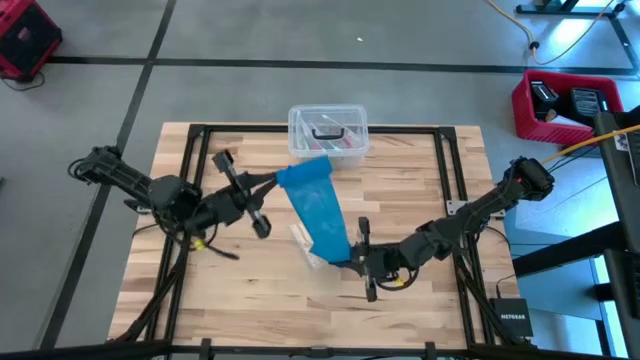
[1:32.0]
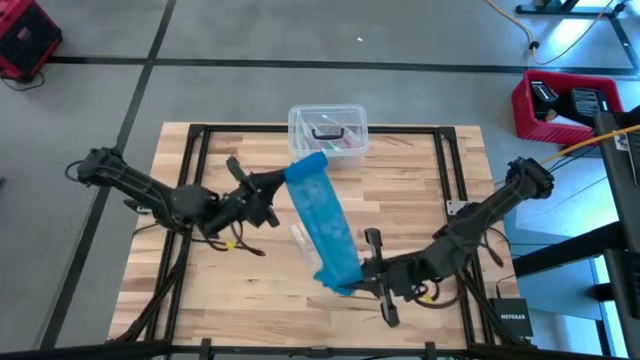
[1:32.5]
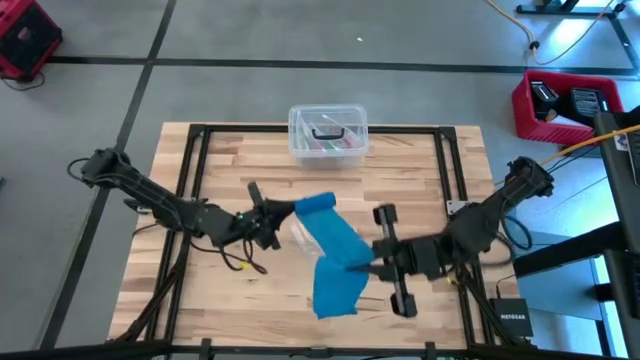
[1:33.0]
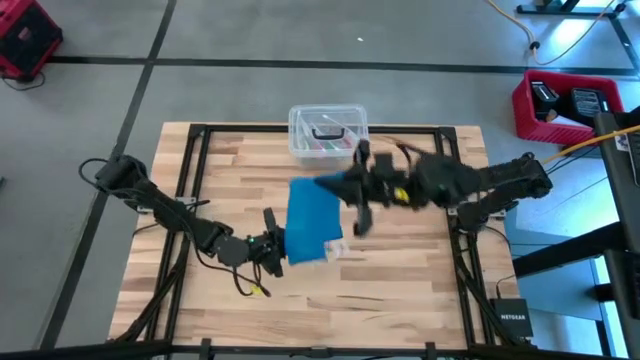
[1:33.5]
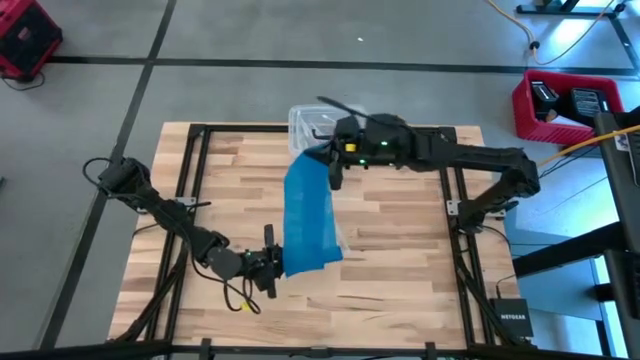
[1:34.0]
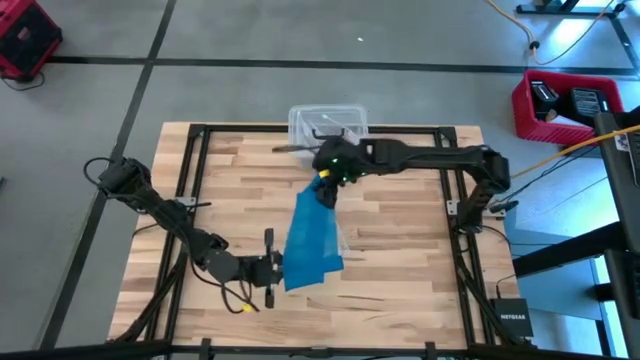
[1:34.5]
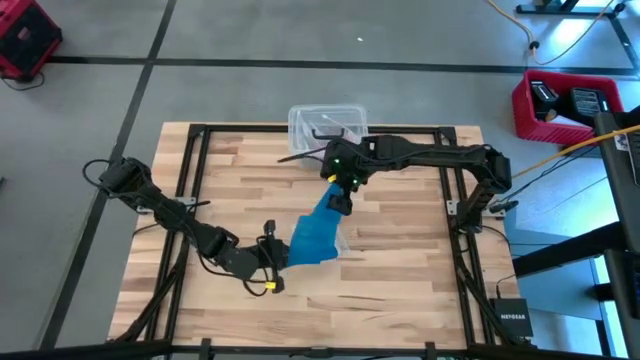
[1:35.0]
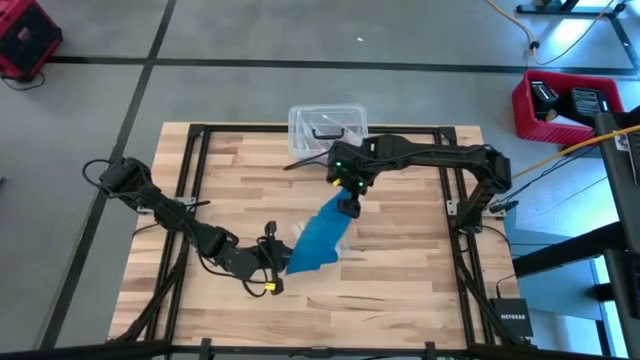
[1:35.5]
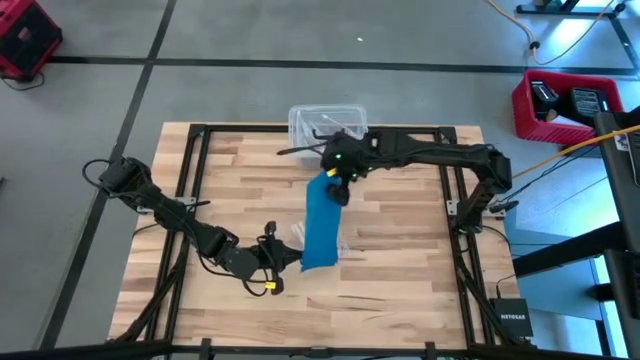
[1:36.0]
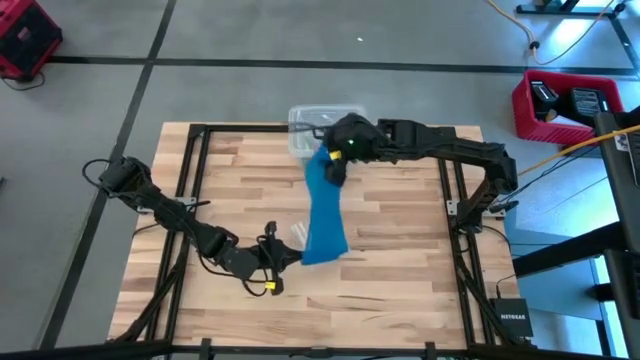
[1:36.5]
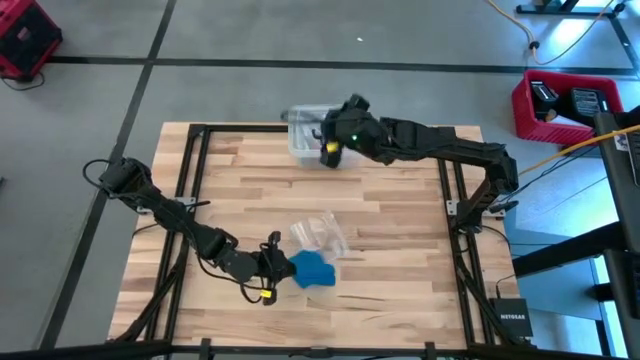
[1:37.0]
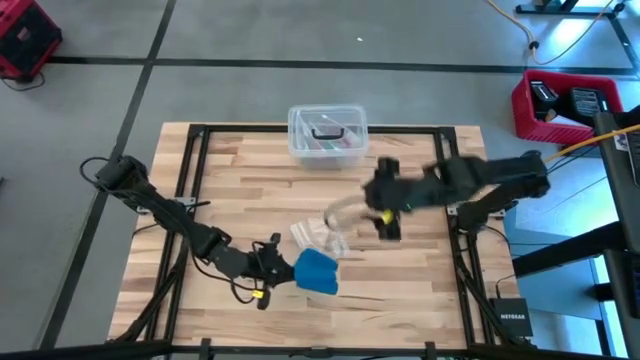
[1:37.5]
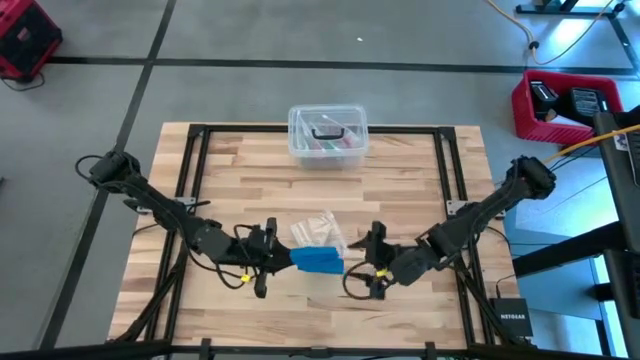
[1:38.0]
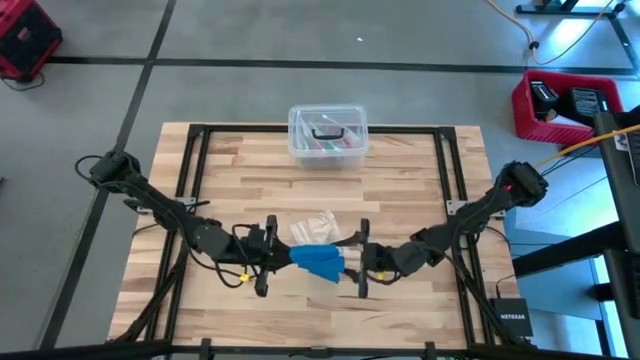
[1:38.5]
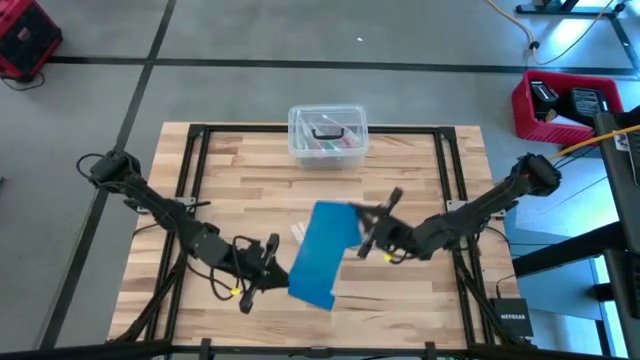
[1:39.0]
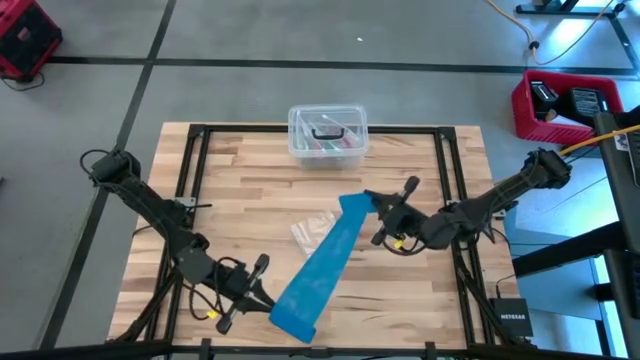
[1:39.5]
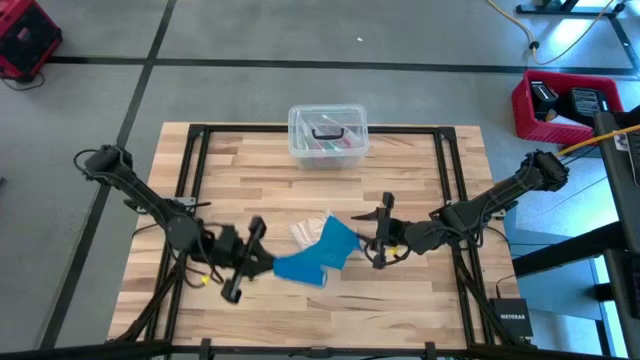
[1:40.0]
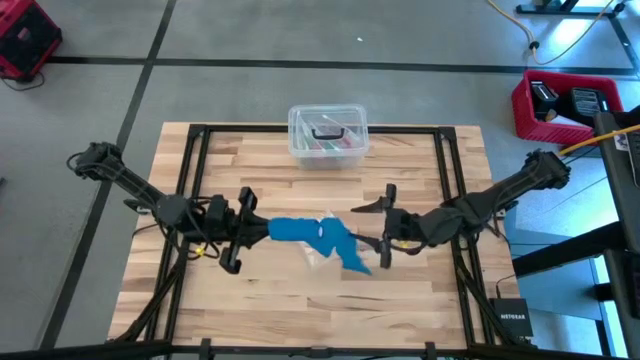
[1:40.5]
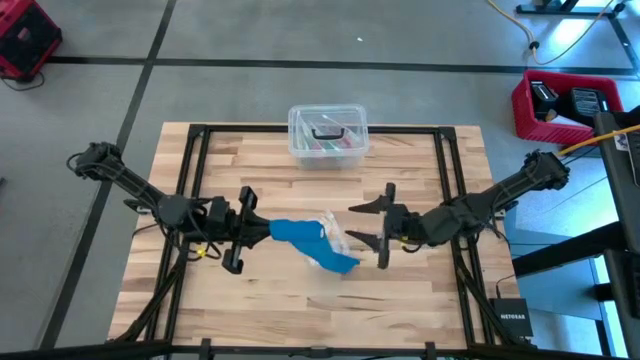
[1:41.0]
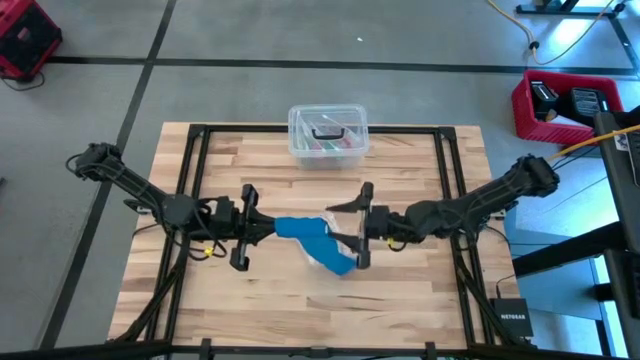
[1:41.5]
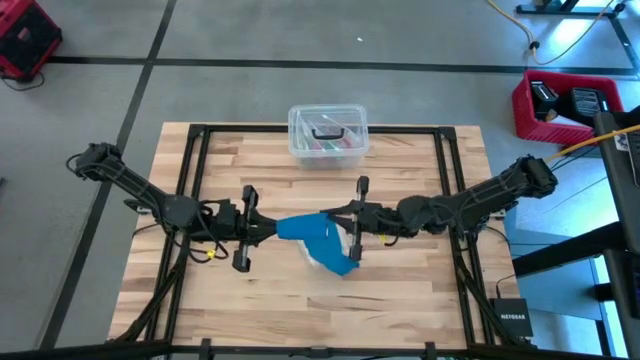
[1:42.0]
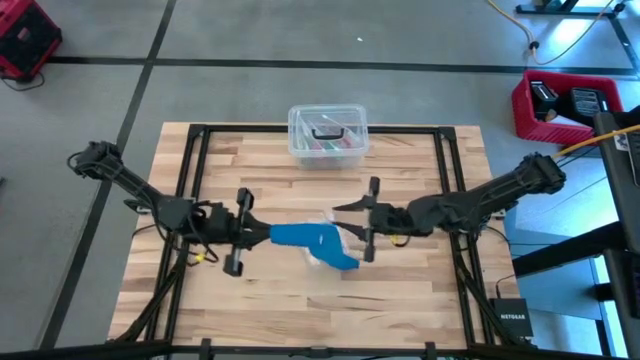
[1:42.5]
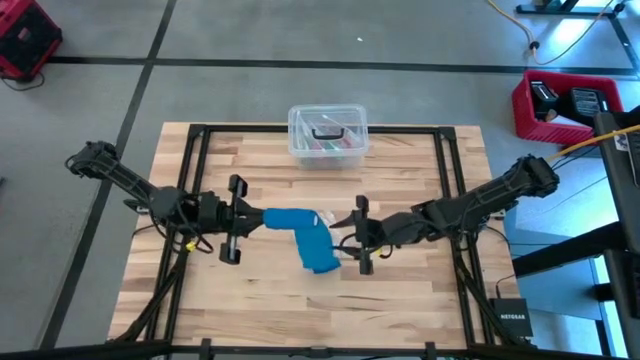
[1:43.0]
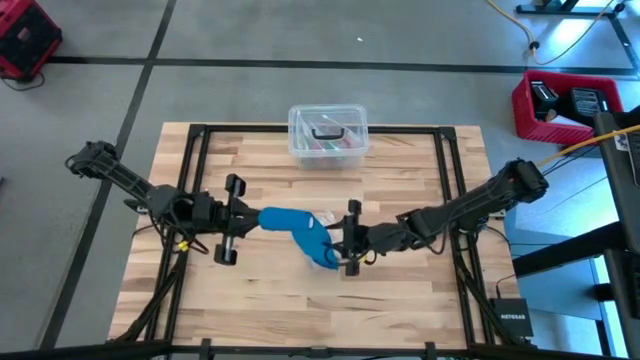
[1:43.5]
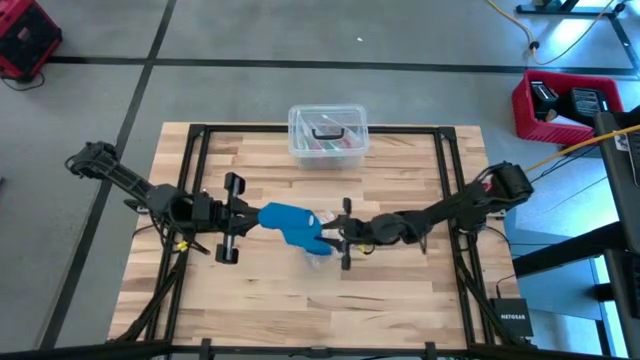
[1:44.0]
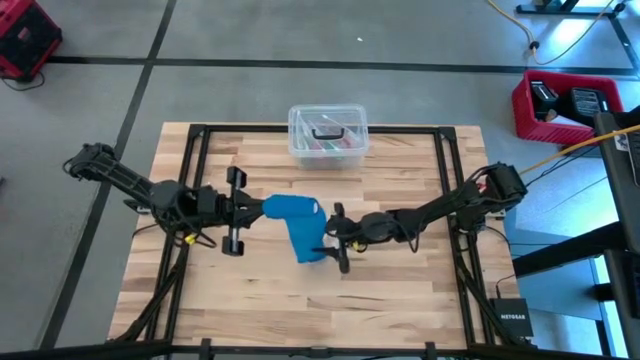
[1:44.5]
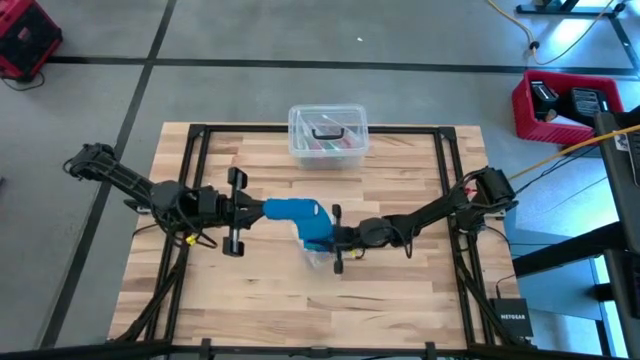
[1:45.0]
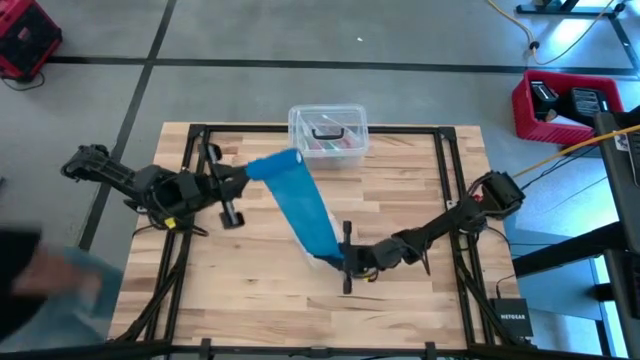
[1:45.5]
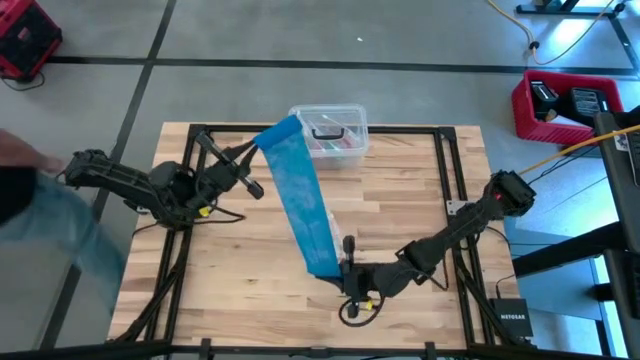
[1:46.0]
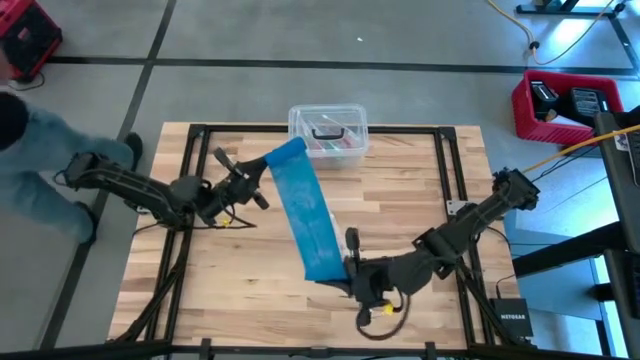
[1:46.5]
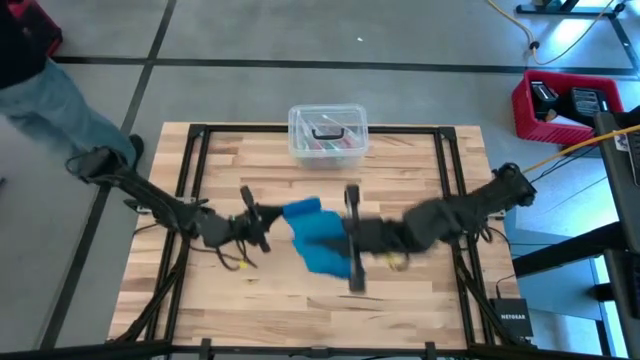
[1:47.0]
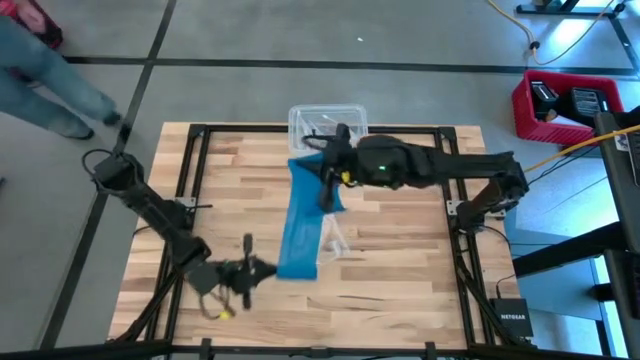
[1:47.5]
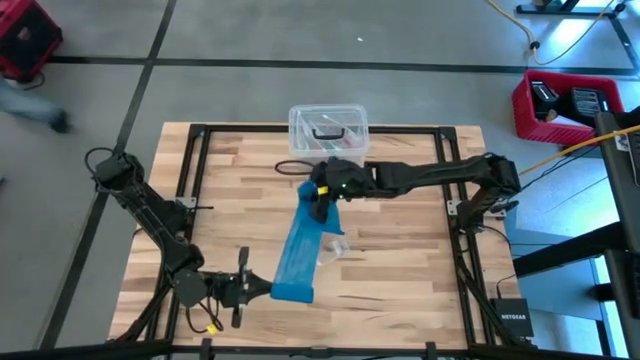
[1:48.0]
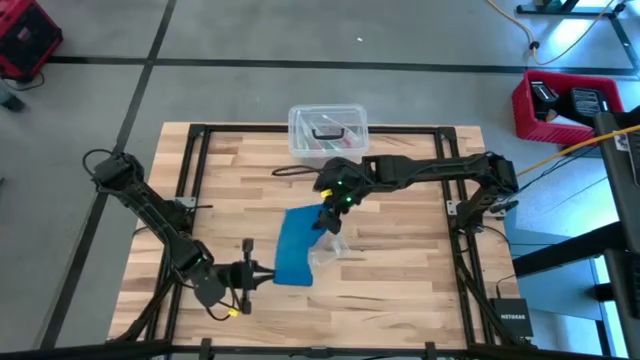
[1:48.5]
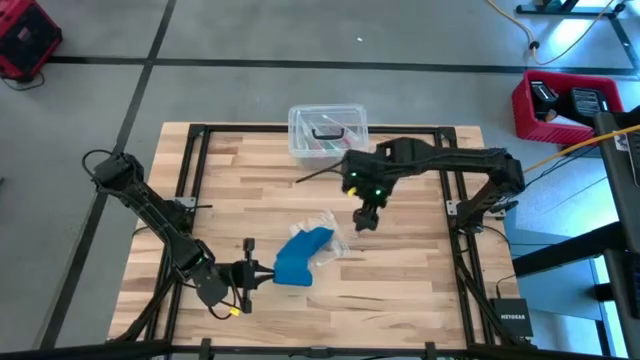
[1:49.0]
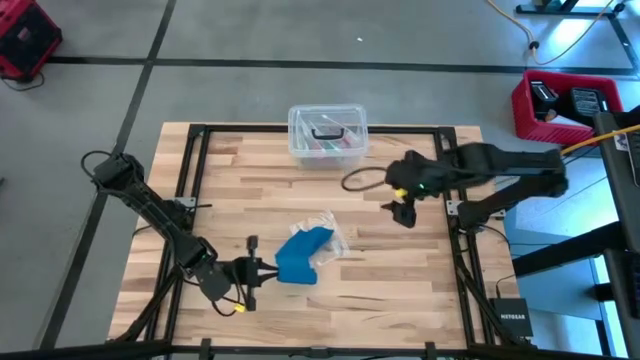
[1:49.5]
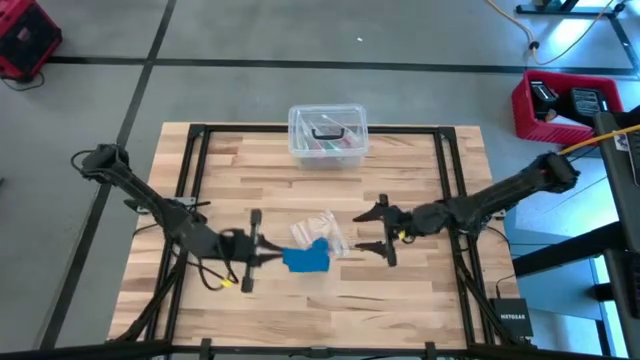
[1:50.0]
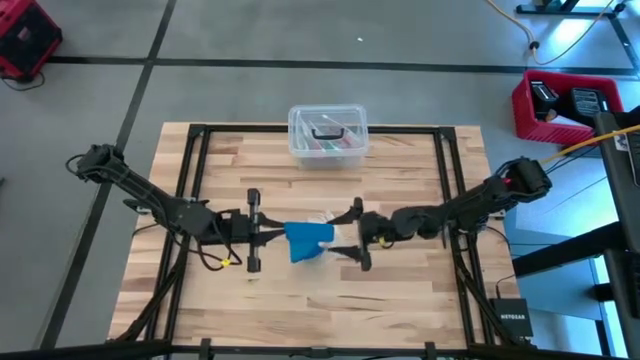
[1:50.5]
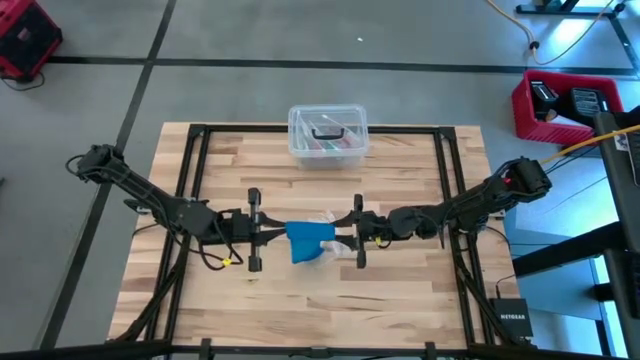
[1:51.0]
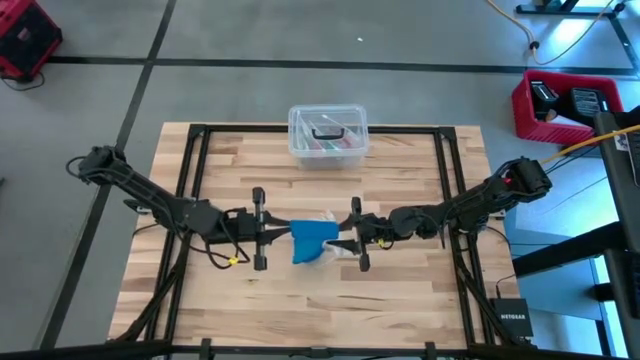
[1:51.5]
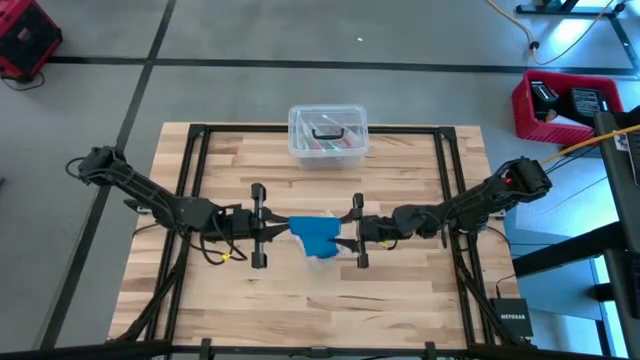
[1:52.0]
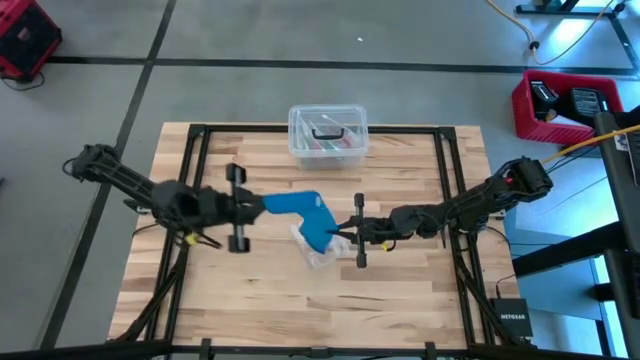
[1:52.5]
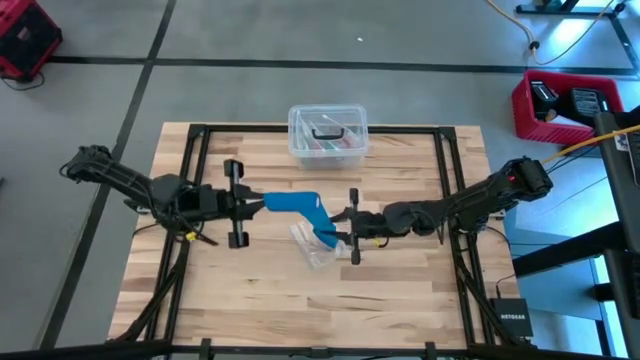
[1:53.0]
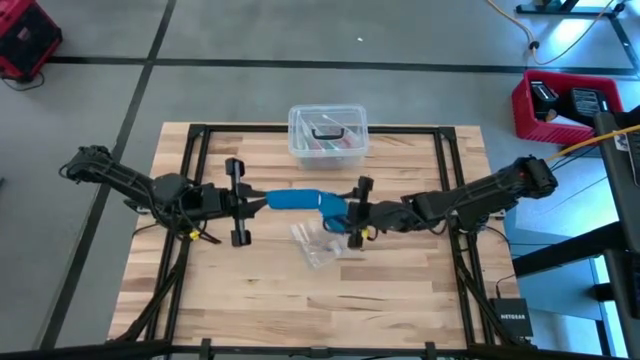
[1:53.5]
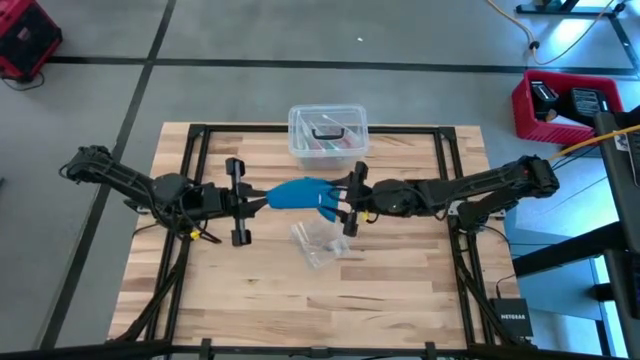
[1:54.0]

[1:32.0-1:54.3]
Task: Roll bandage
Roll the blue bandage
